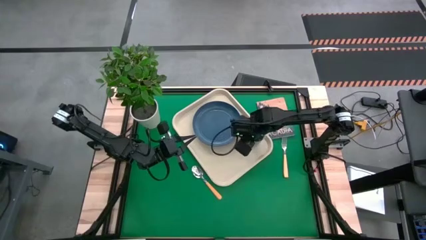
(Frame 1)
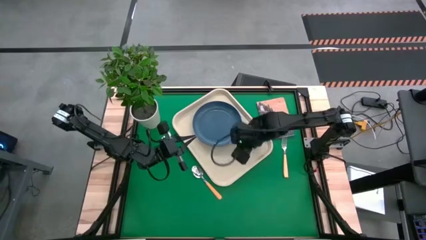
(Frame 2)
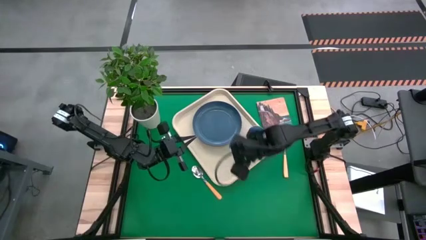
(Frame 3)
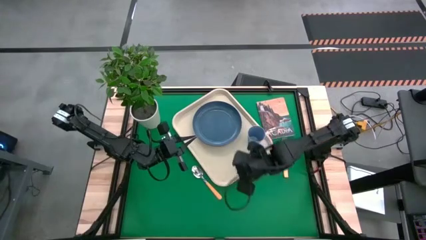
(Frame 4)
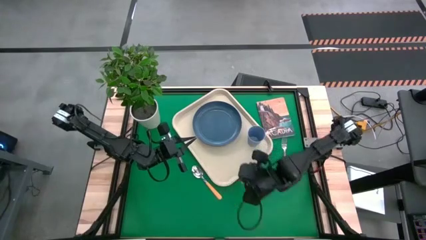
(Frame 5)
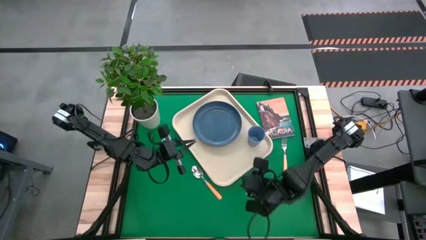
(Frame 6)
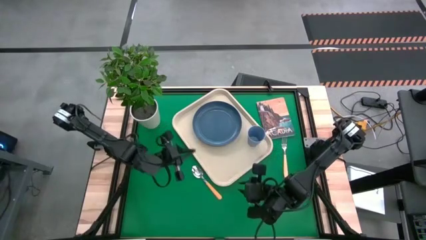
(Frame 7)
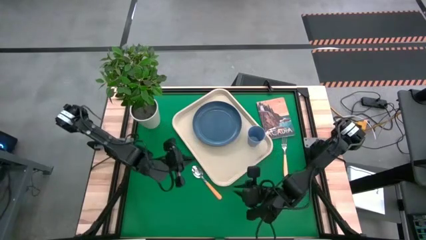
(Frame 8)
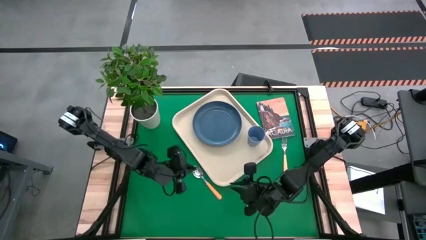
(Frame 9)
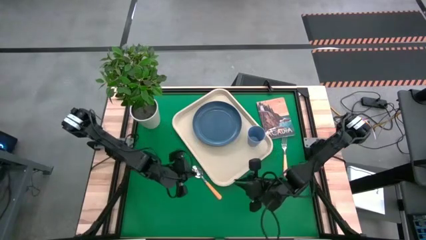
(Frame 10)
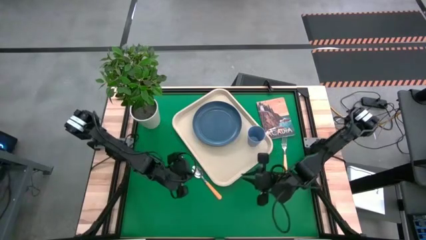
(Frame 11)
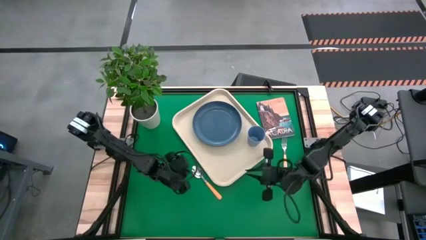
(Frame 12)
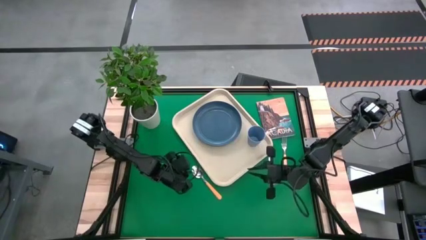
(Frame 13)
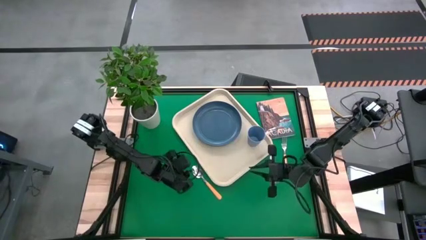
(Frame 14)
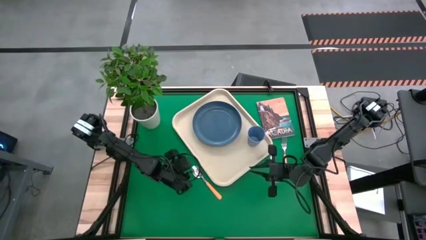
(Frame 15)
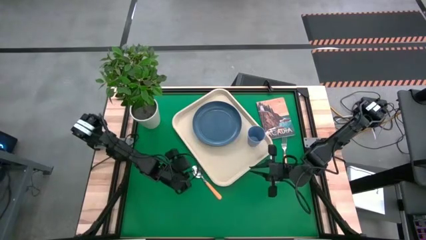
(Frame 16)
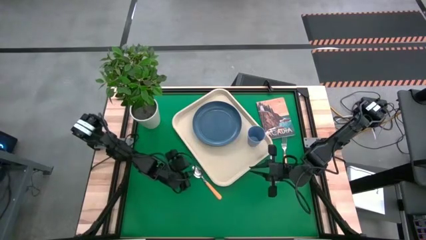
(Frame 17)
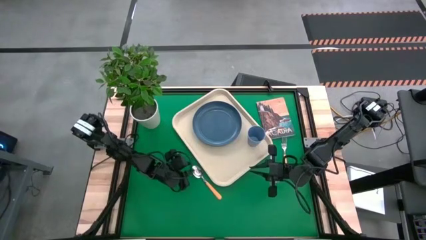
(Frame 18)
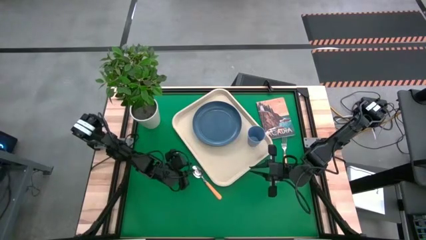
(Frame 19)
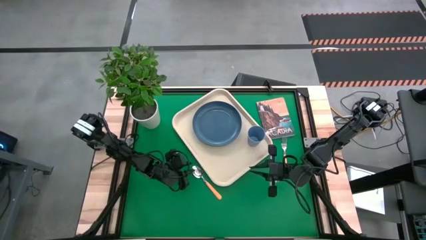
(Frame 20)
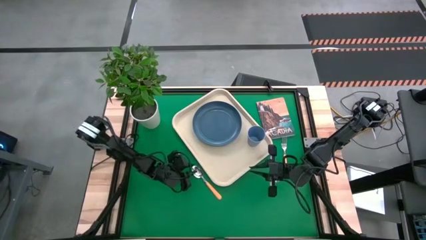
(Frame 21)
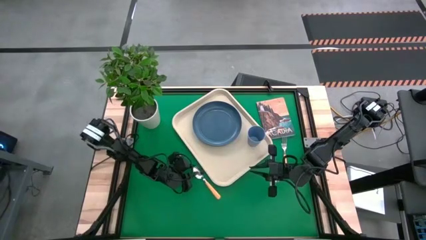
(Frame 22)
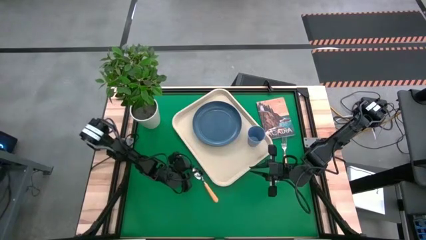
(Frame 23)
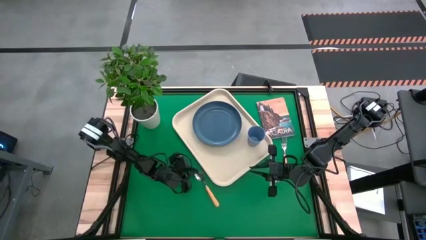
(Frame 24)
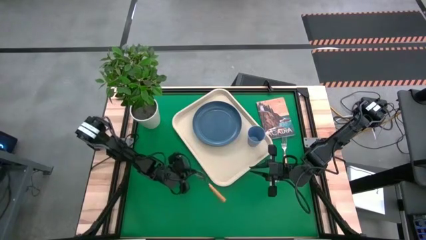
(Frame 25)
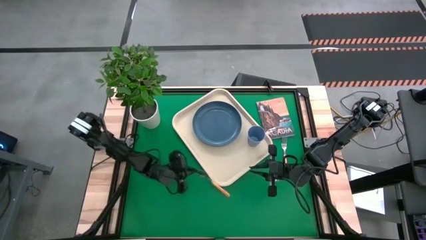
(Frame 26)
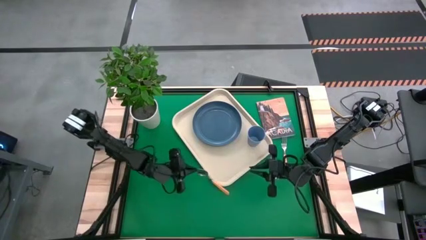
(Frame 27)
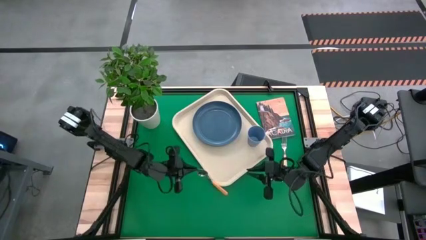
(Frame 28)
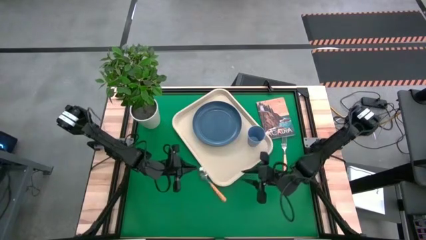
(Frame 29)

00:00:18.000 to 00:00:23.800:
Task: Pick and place plate/cup/fork/spoon on tray
Put the spoon on the white serving tray to the bottom of the blue cup

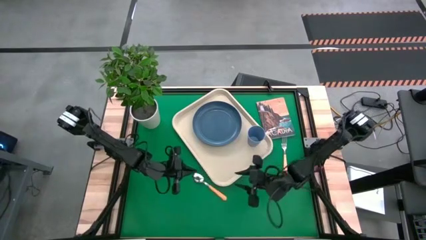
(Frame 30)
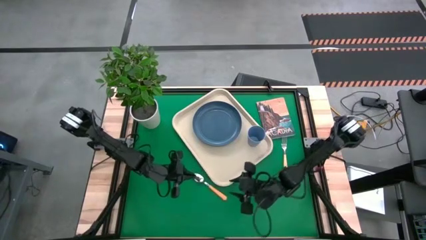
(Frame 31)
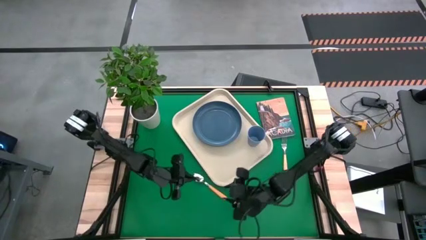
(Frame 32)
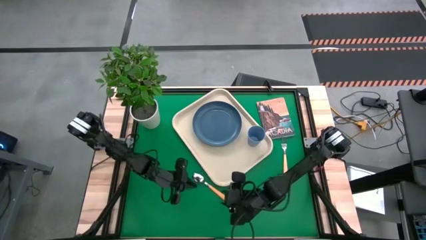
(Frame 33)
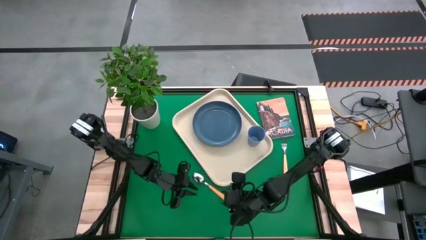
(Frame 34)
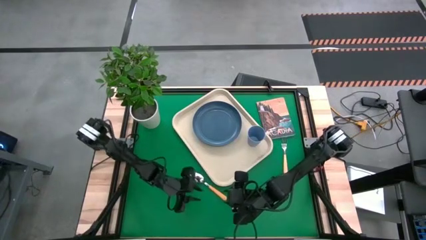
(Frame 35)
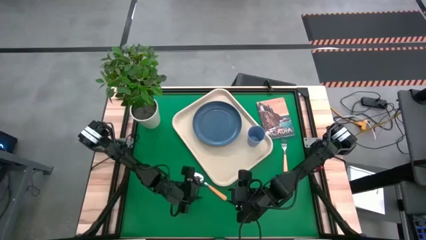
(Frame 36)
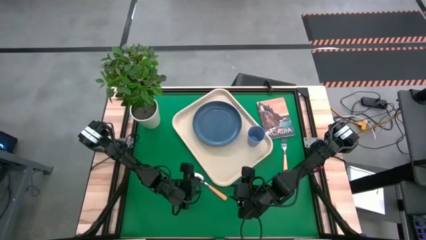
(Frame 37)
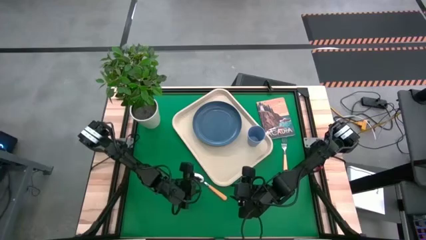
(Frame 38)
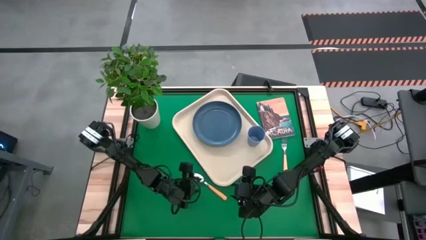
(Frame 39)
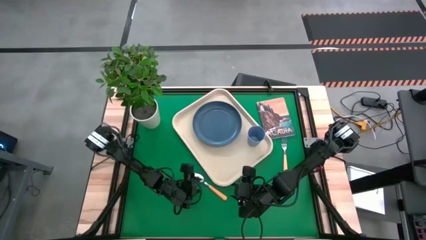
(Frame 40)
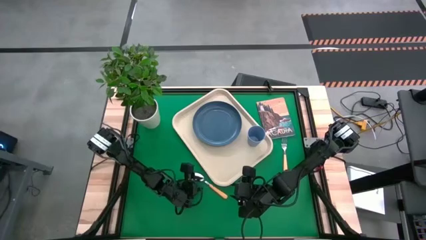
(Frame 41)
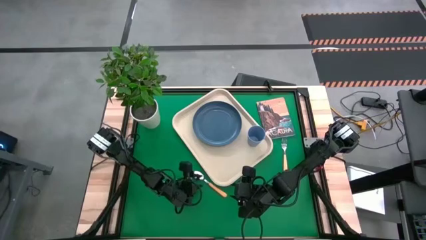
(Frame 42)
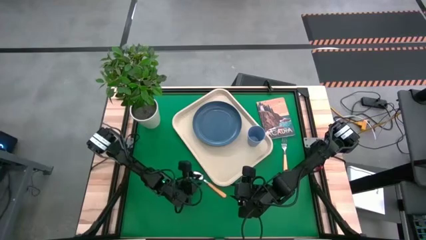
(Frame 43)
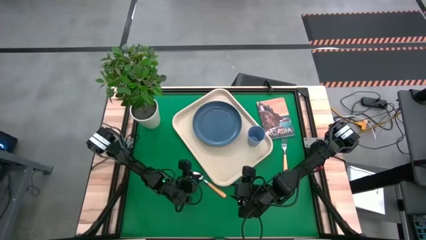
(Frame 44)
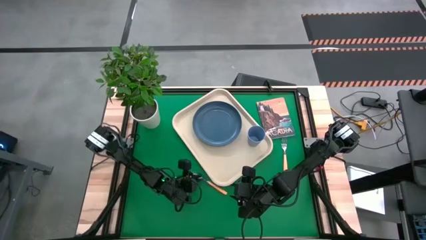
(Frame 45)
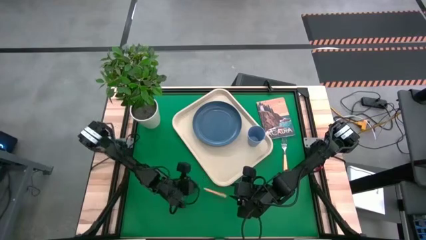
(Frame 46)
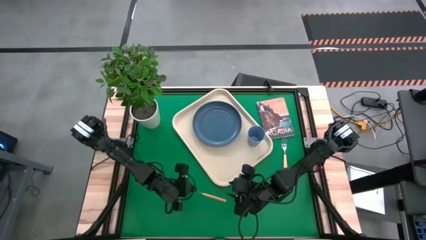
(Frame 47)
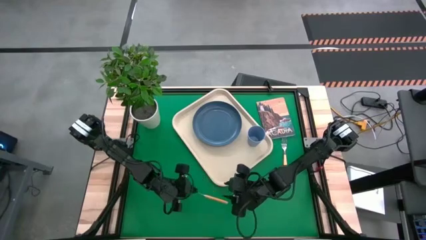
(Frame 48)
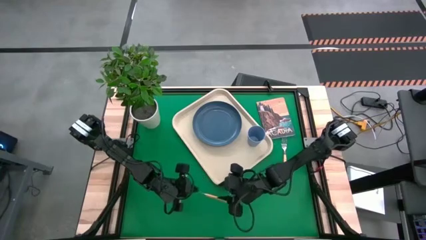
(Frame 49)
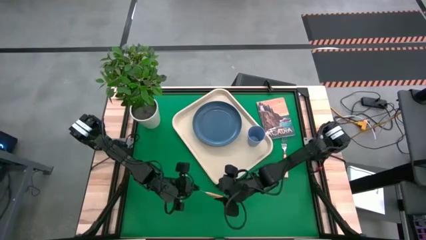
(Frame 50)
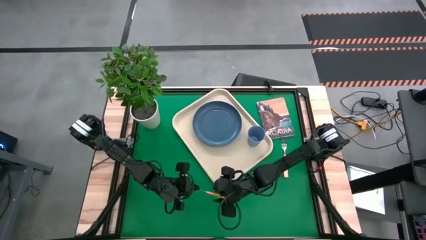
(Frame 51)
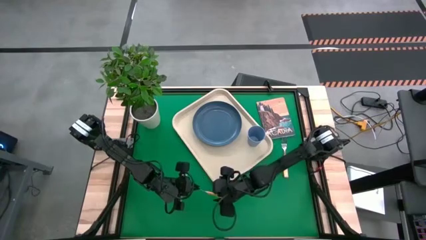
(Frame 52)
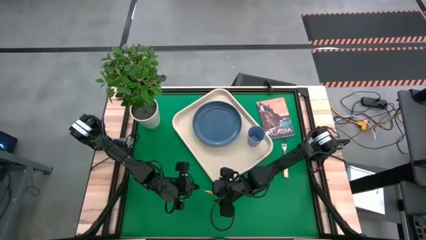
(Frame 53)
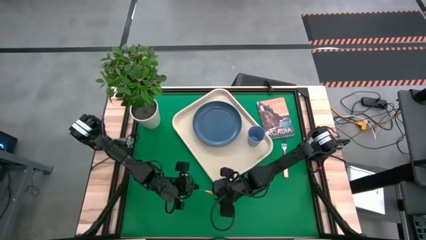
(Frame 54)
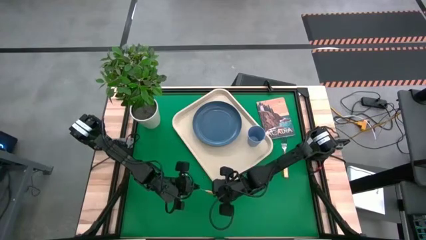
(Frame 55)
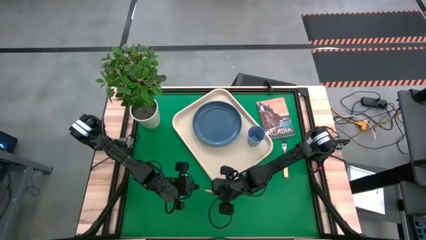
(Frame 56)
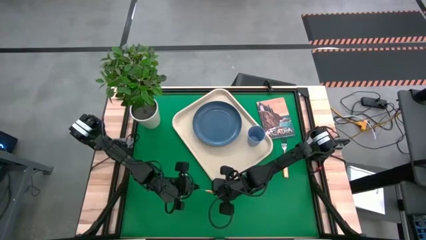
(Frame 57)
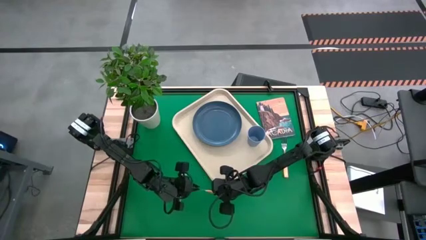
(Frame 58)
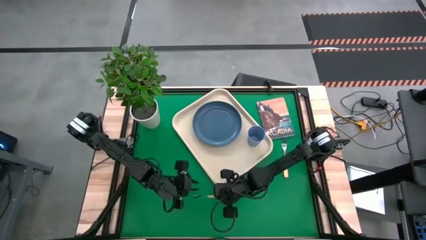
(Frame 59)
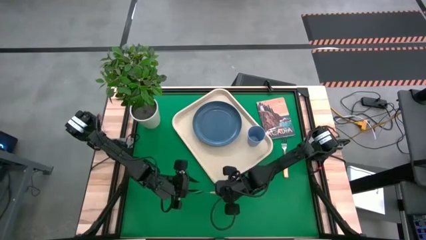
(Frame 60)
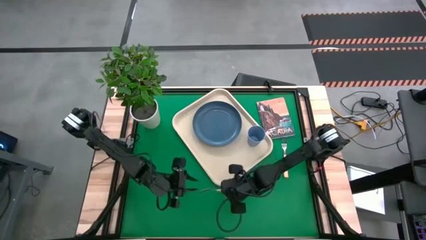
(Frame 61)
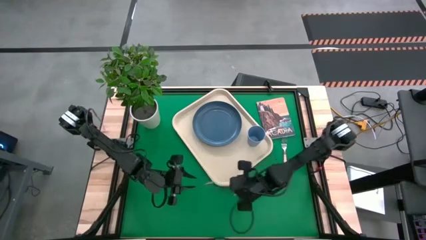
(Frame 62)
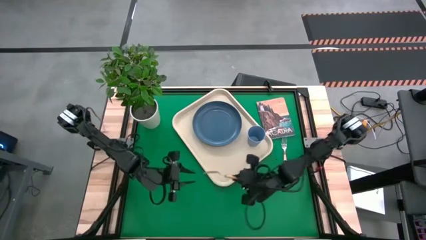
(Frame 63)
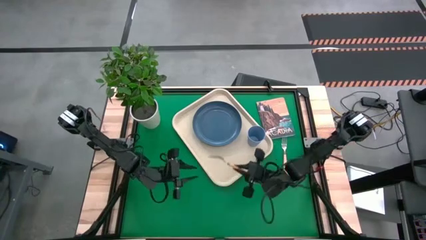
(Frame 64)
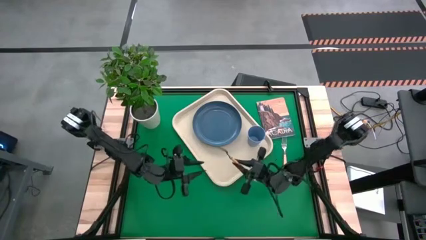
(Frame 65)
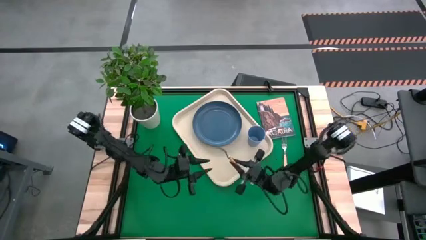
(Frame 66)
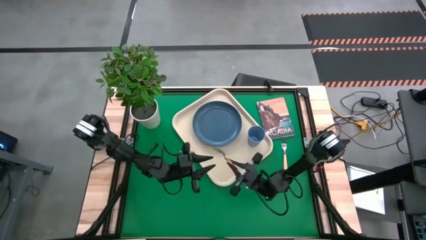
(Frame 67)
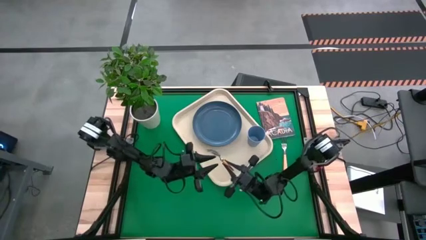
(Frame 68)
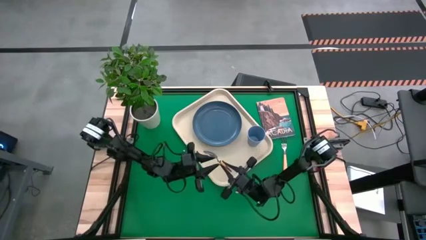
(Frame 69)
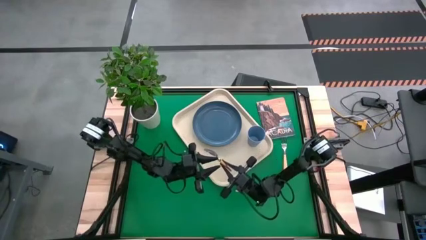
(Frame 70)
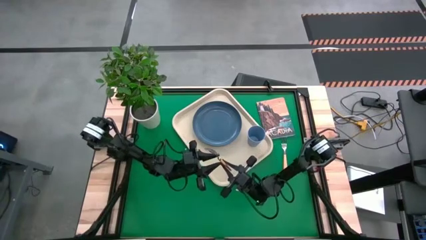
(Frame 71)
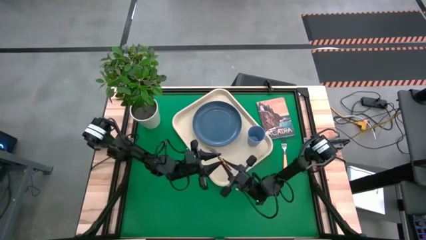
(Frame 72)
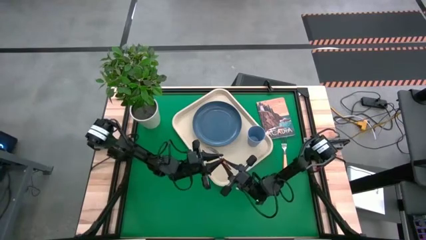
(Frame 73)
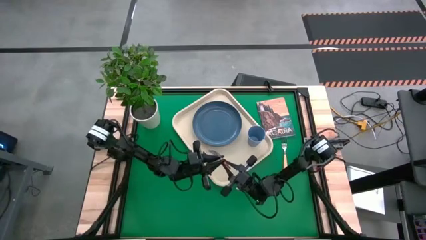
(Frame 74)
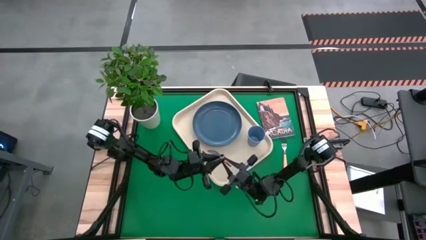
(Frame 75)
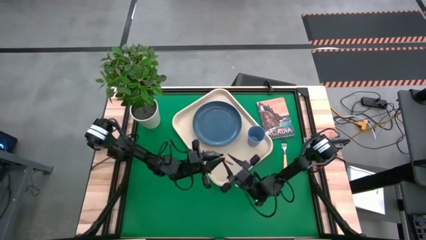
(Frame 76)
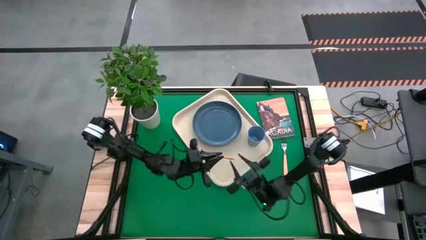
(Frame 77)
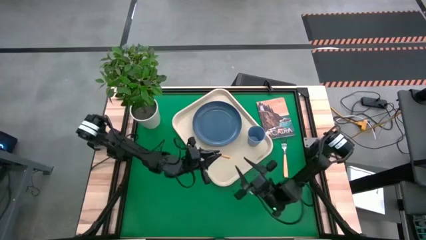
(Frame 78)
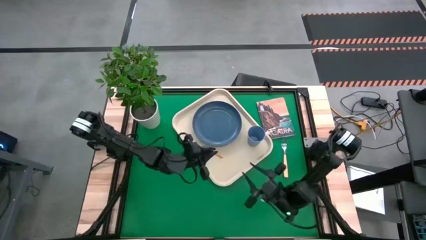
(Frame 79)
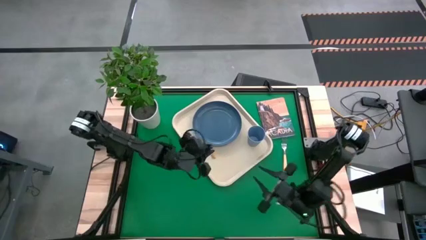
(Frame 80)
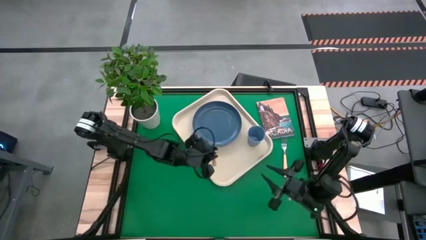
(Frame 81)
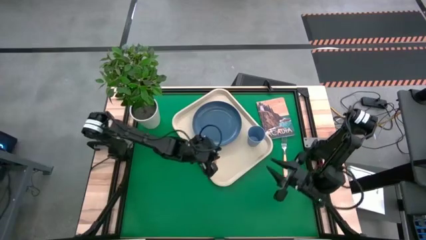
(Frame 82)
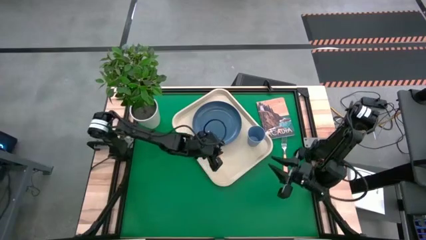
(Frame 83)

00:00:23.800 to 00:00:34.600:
Put the spoon on the white serving tray to the bottom of the blue cup
